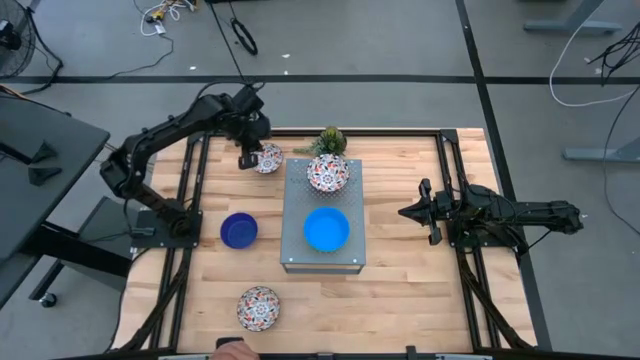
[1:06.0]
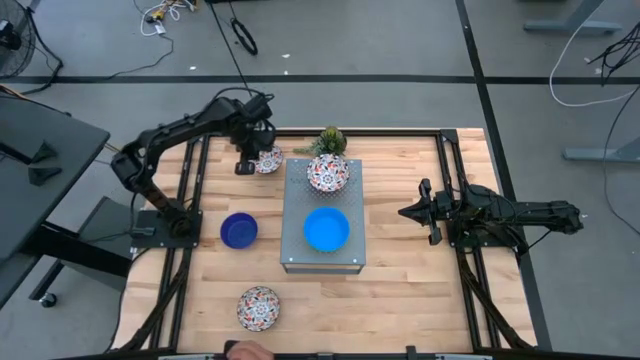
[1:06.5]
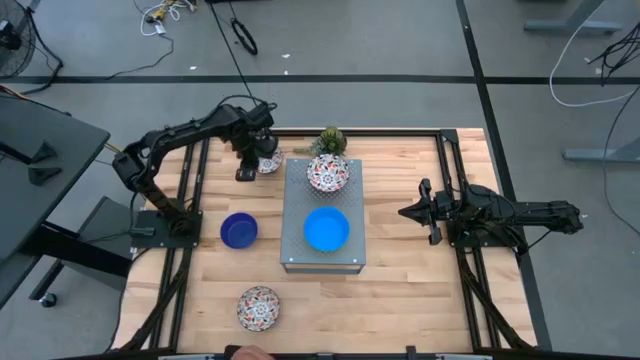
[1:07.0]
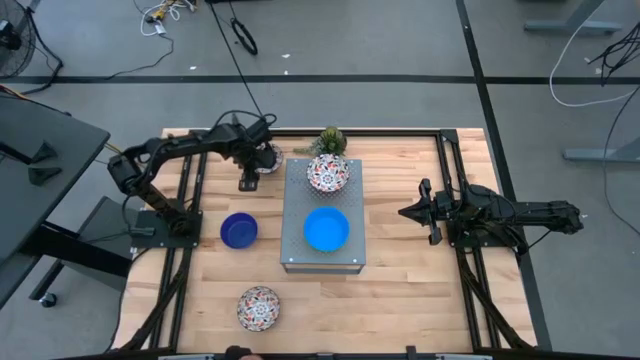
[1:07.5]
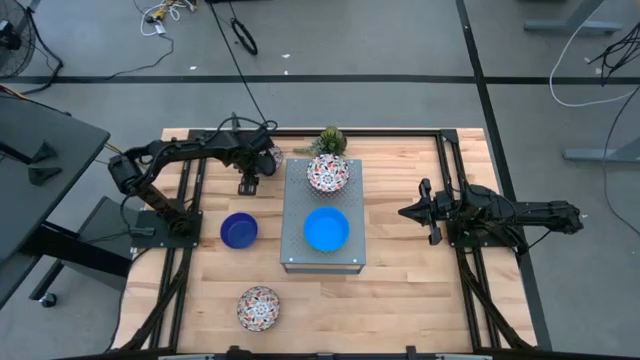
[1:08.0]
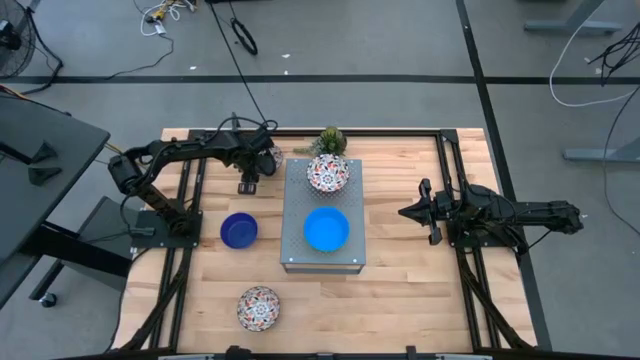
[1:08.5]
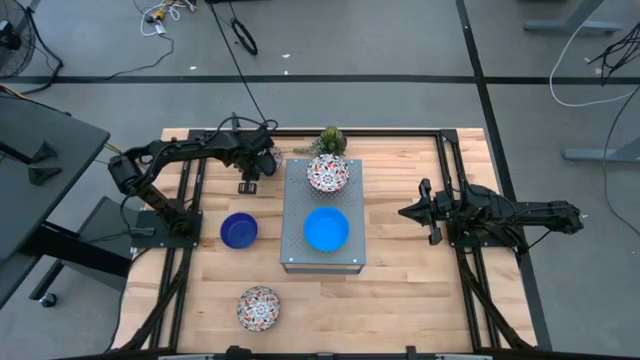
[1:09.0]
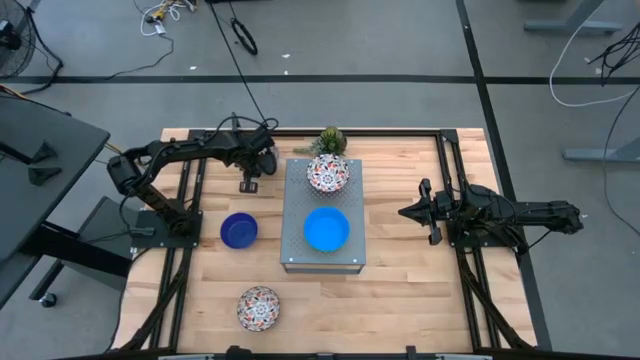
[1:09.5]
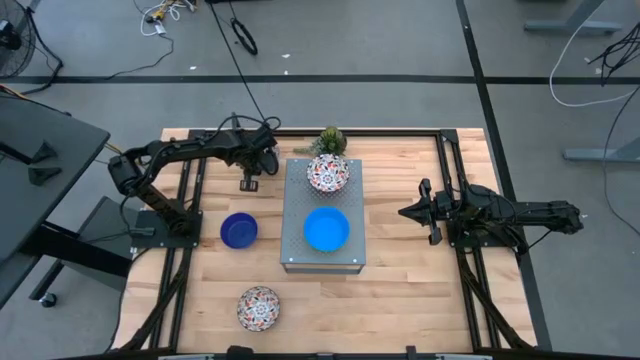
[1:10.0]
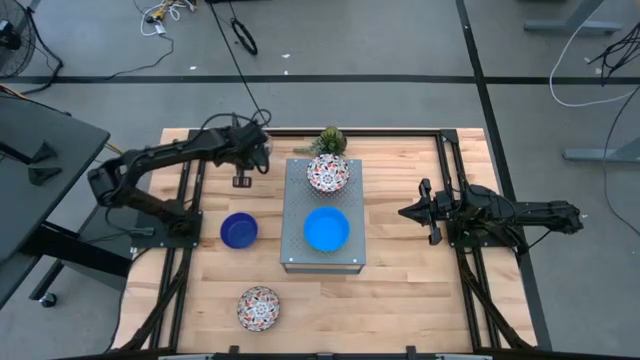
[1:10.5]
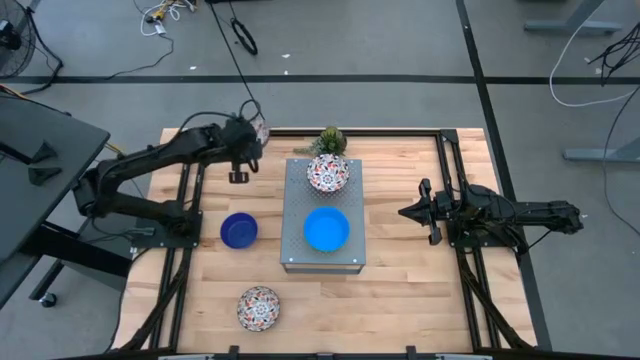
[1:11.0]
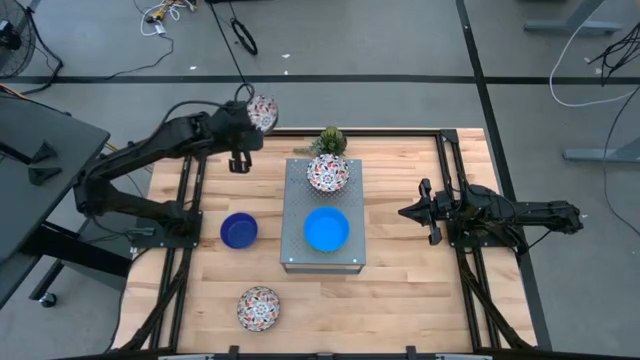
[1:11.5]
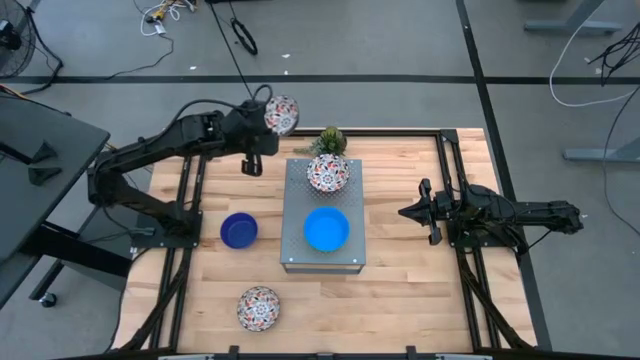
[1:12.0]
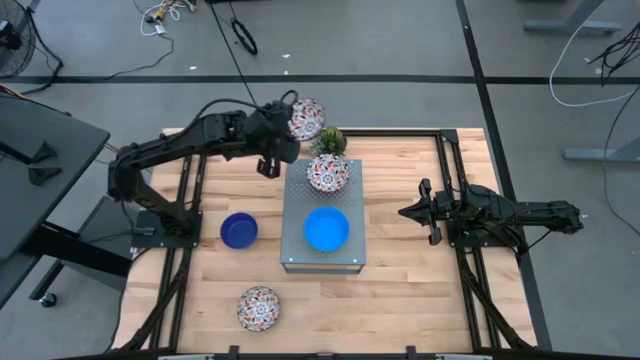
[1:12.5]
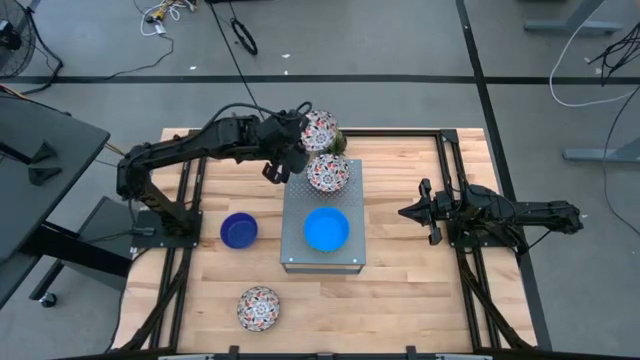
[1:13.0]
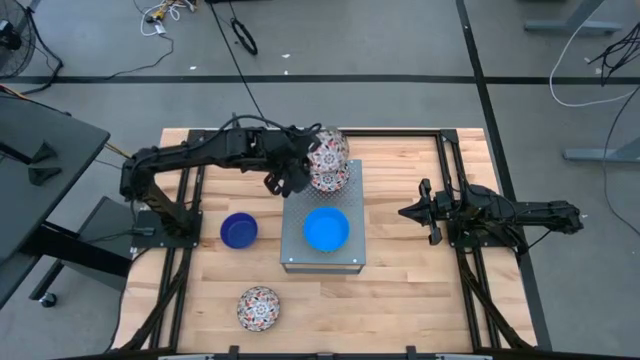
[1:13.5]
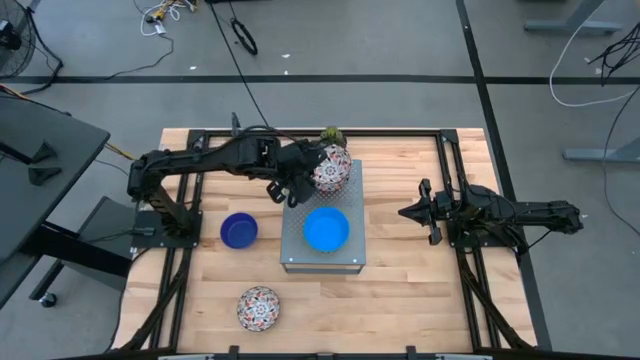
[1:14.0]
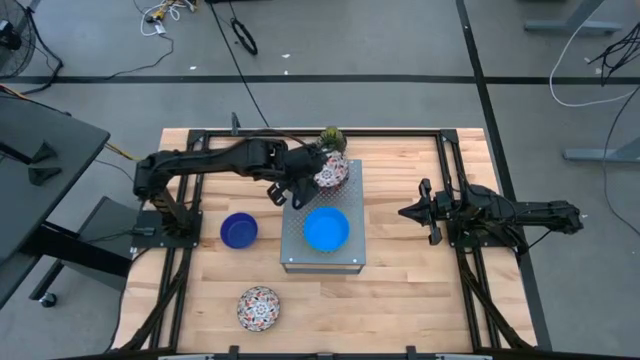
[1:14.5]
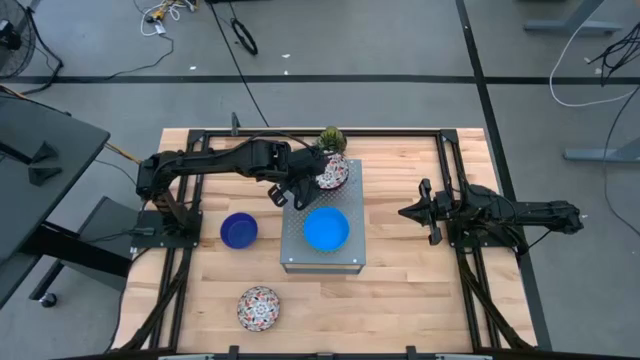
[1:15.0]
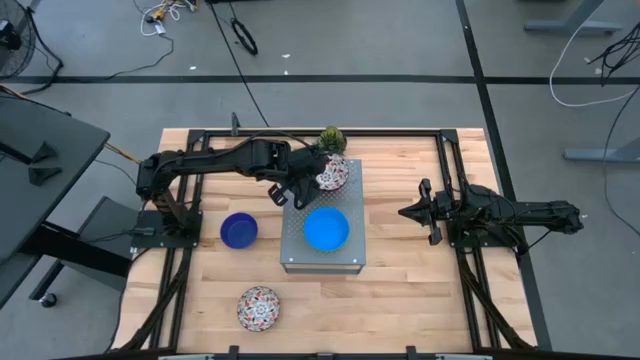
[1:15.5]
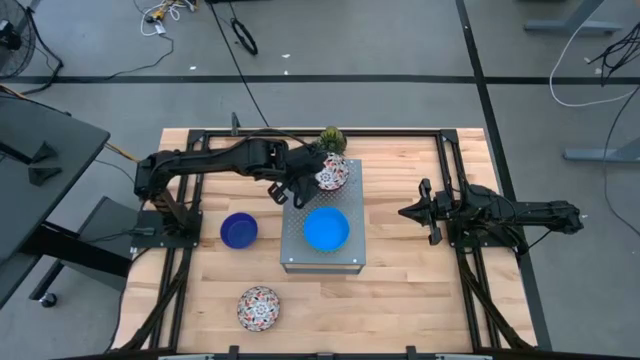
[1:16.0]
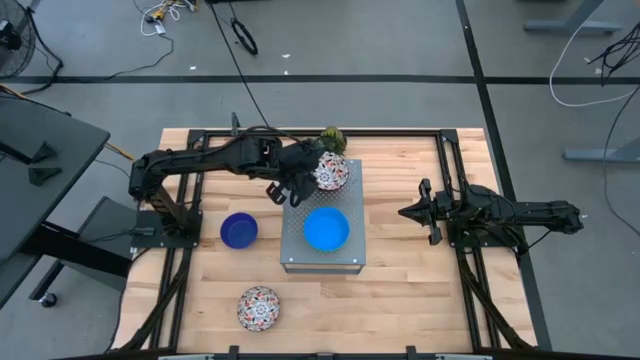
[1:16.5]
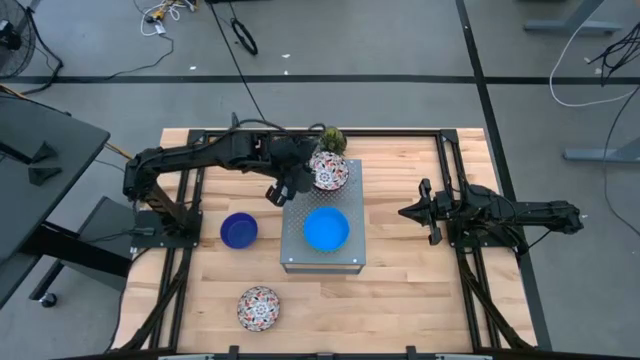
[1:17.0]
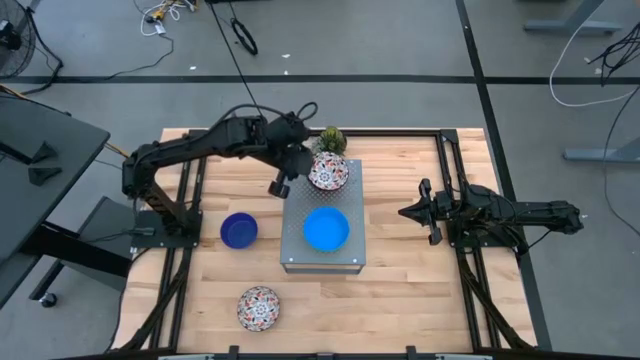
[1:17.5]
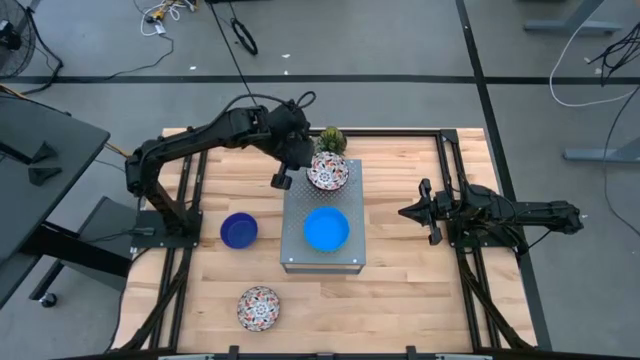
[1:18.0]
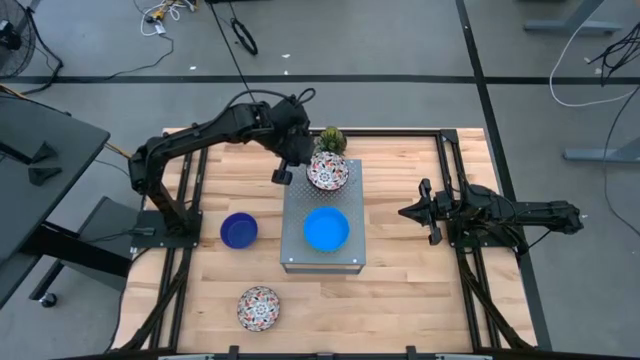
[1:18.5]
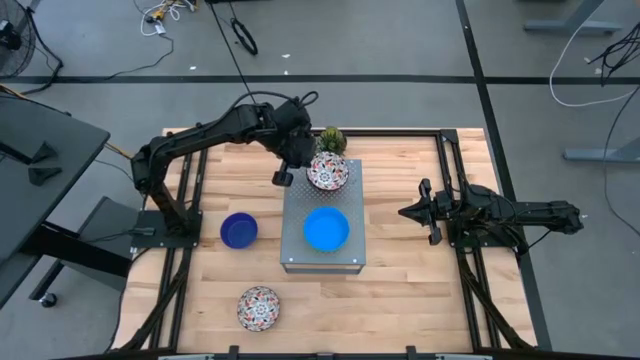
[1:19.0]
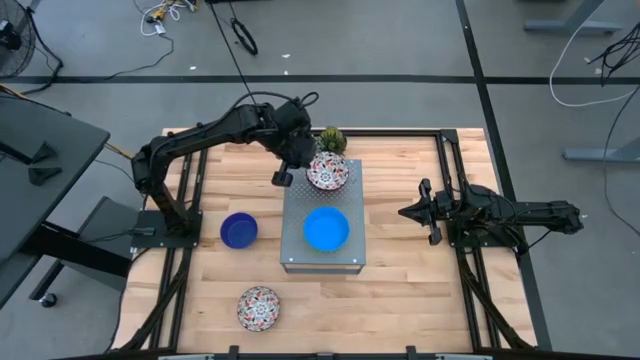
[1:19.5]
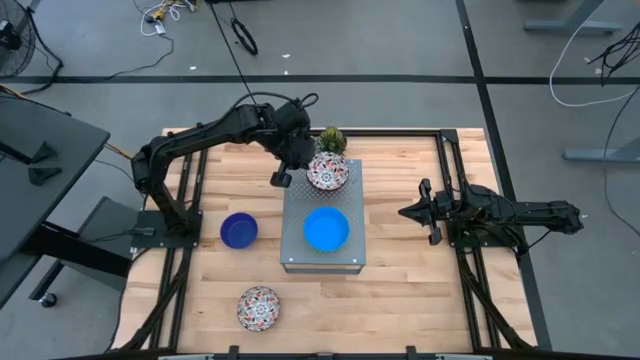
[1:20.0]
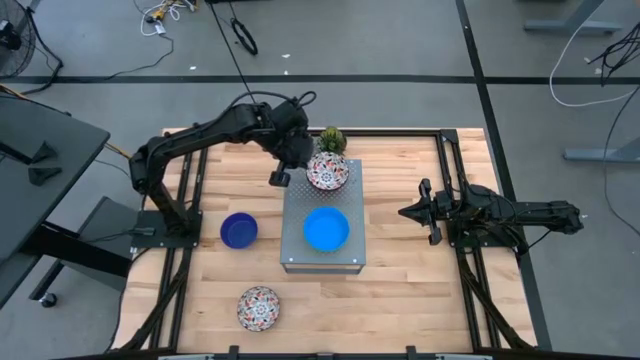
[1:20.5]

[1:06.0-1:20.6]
Task: Pick & Place Mini bowls
Stack the top white patterned bowl on the other white patterned bowl on the shelf

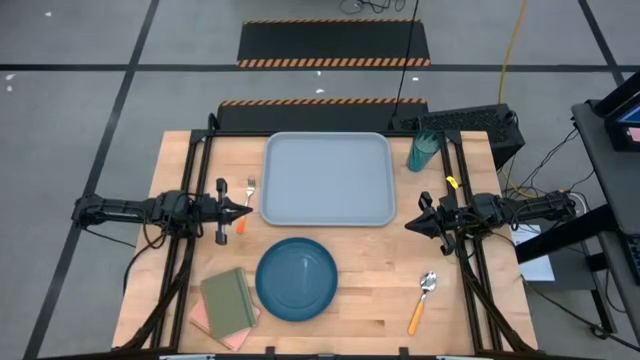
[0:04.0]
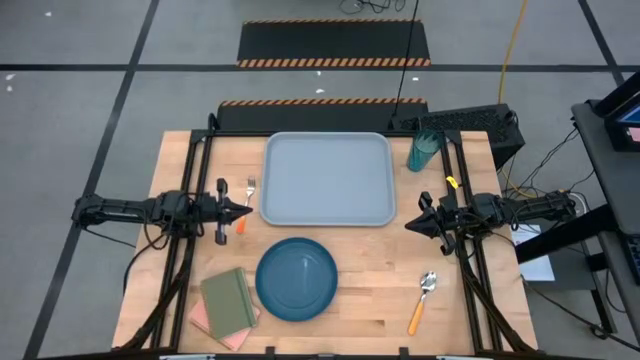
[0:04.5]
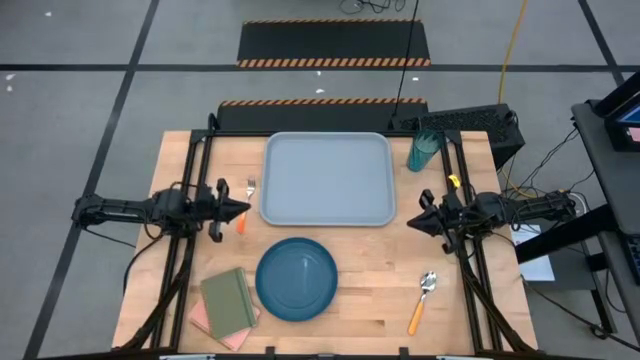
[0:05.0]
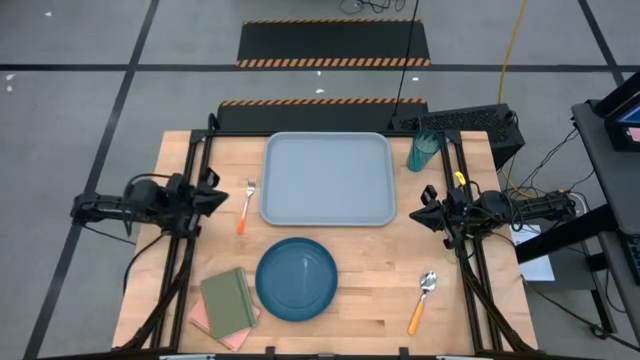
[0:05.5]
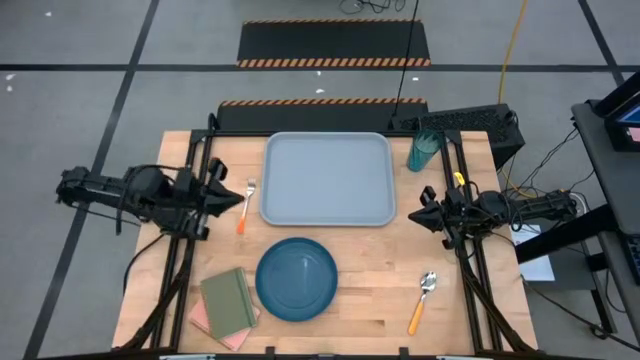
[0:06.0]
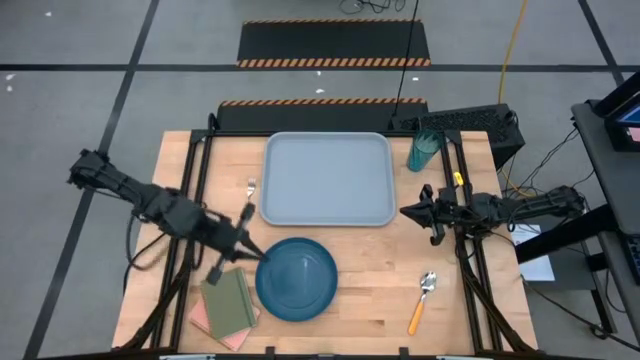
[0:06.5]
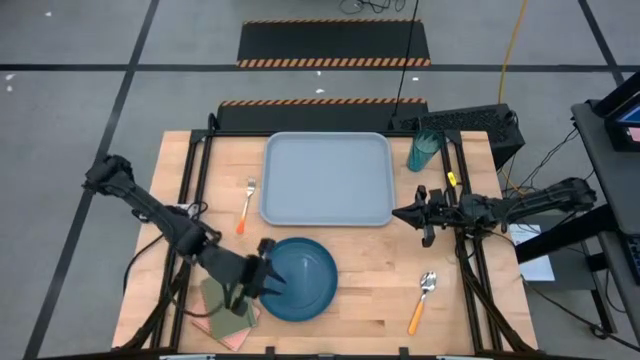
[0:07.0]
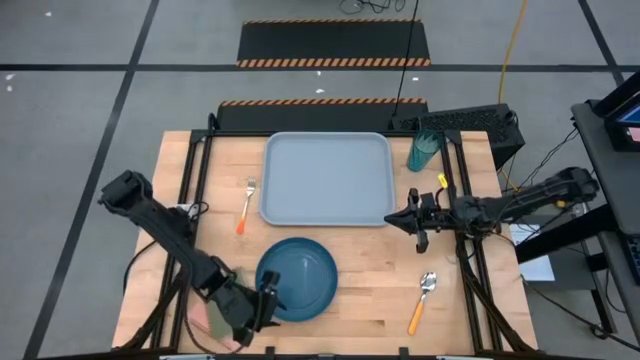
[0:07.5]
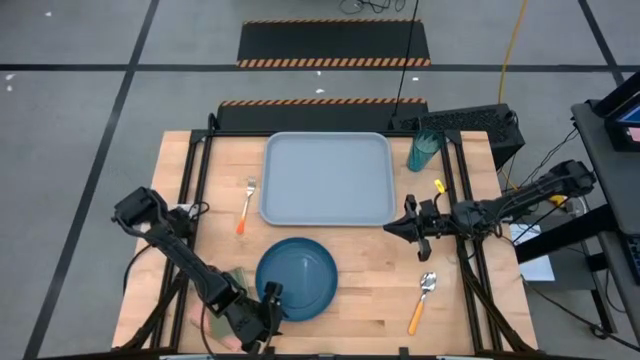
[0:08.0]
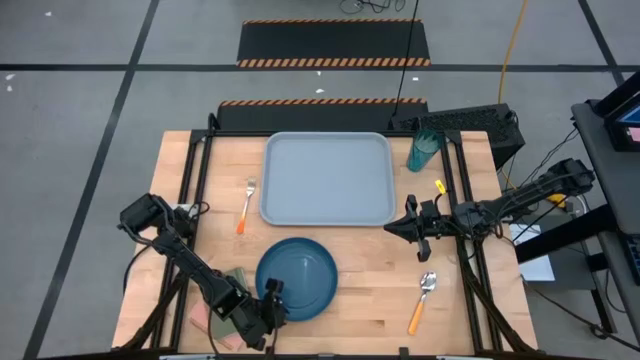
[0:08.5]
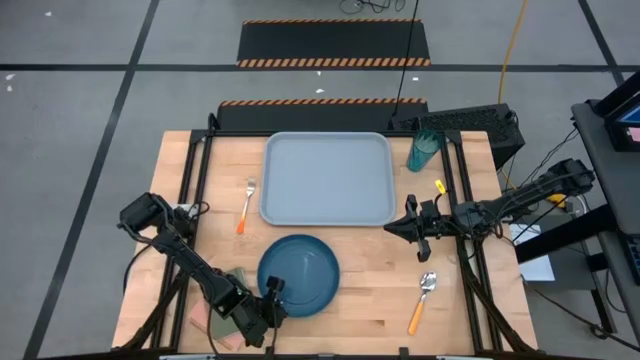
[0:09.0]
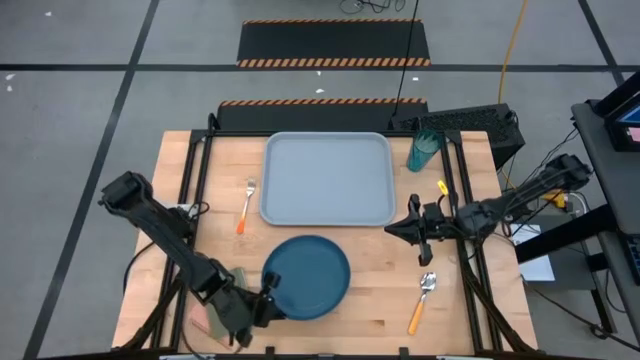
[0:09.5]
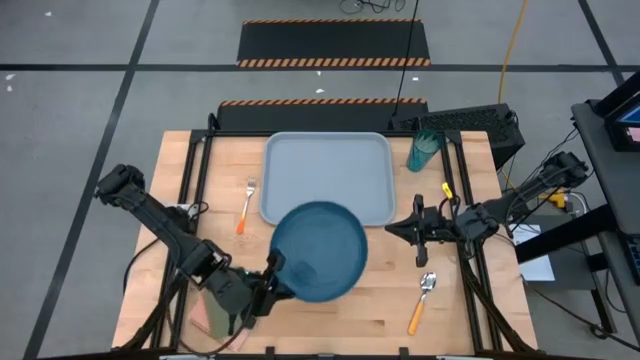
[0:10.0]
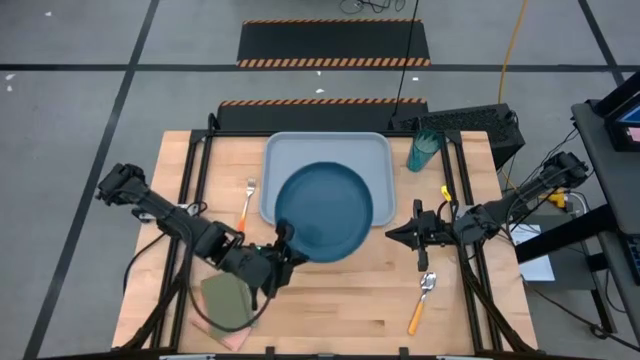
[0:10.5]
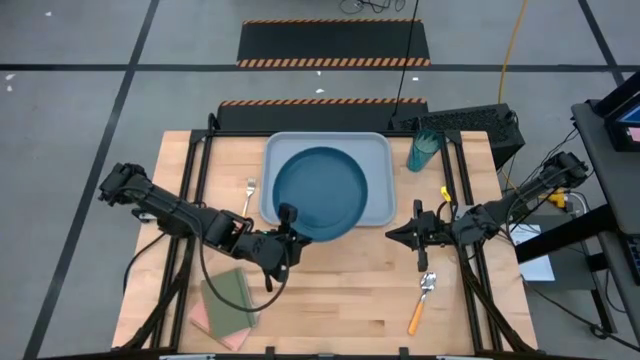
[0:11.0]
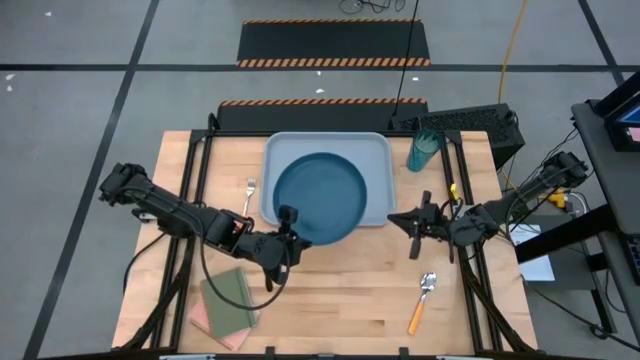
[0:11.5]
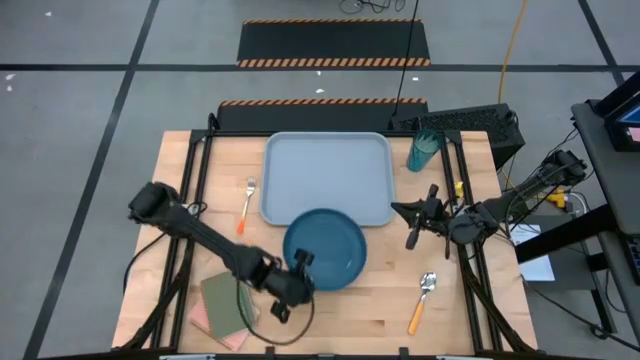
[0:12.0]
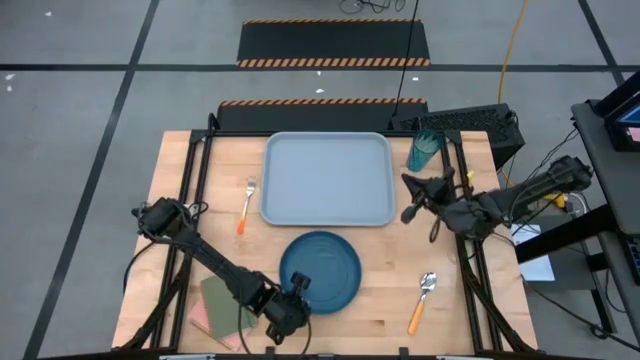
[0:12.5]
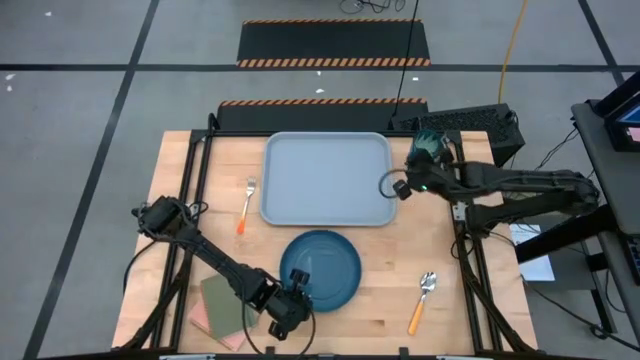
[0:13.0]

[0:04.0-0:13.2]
Task: Pick and place plate/cup/fork/spoon on tray
Put the blue plate on the blue tray
